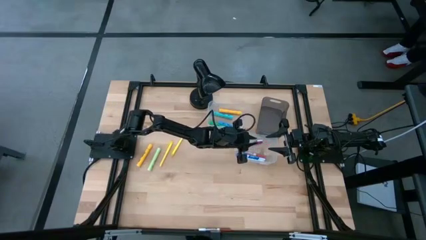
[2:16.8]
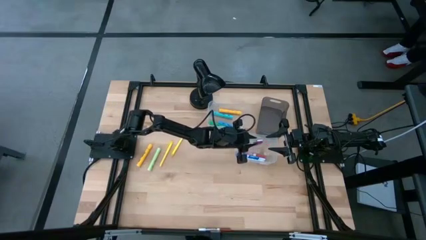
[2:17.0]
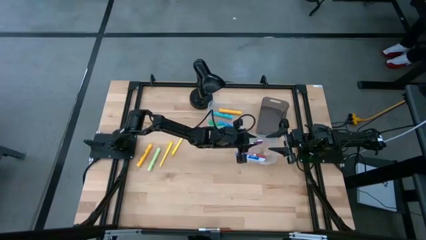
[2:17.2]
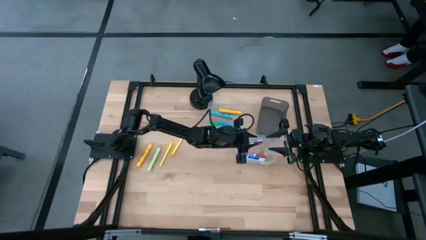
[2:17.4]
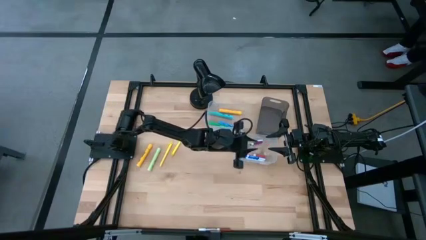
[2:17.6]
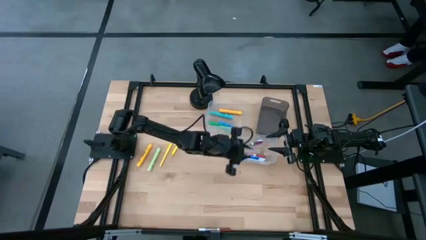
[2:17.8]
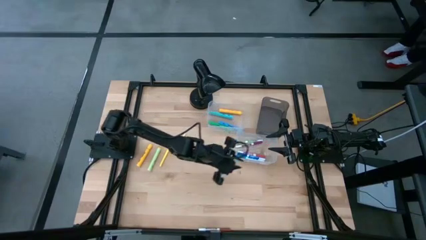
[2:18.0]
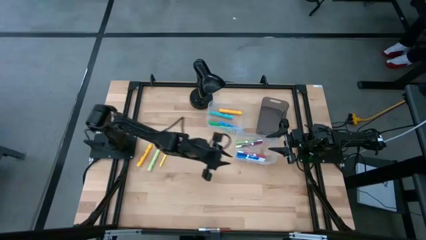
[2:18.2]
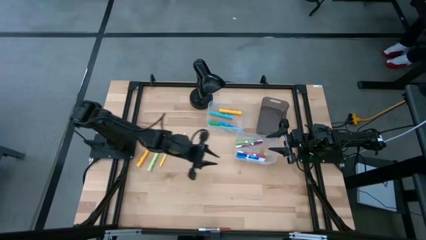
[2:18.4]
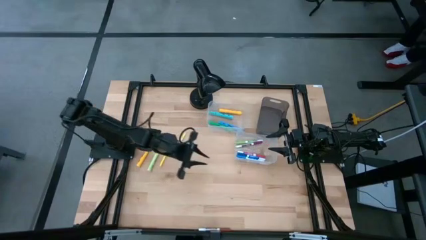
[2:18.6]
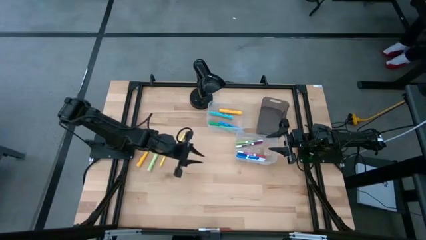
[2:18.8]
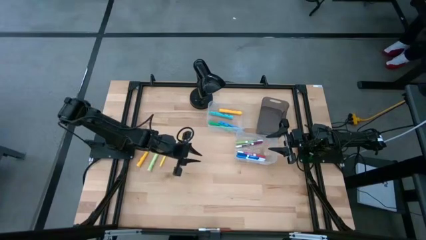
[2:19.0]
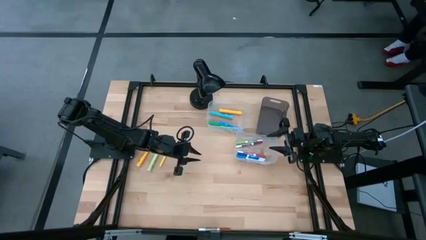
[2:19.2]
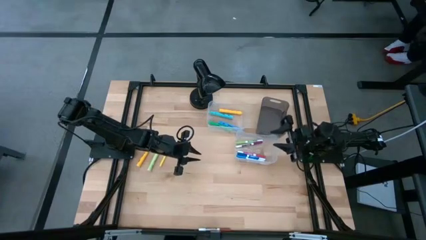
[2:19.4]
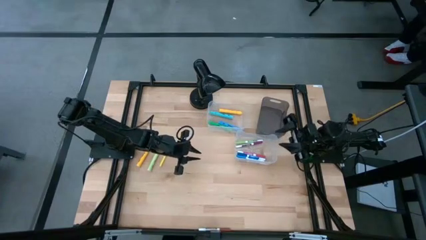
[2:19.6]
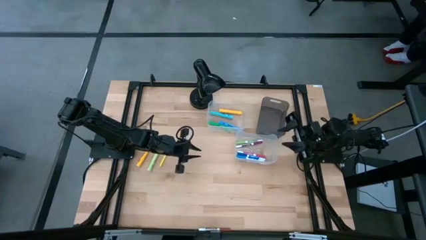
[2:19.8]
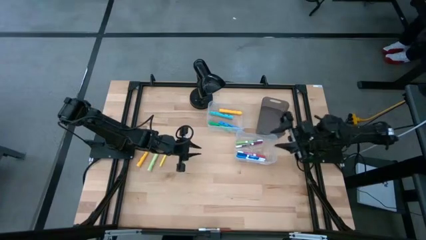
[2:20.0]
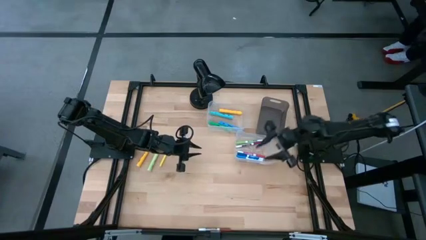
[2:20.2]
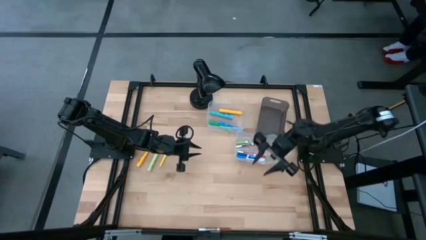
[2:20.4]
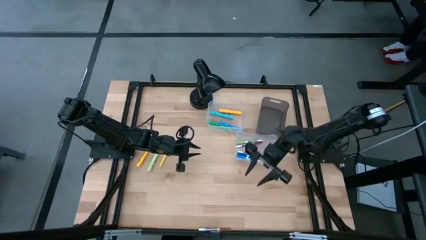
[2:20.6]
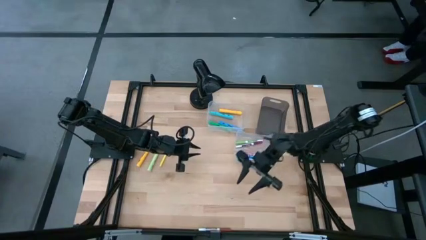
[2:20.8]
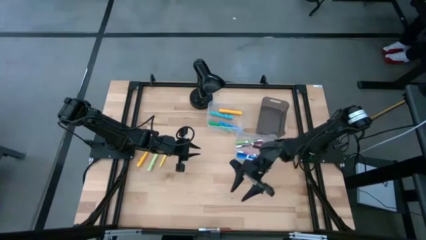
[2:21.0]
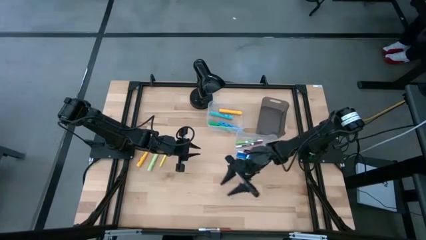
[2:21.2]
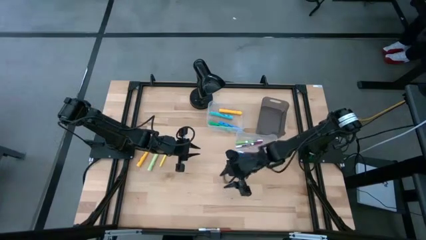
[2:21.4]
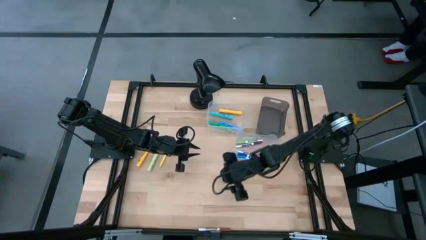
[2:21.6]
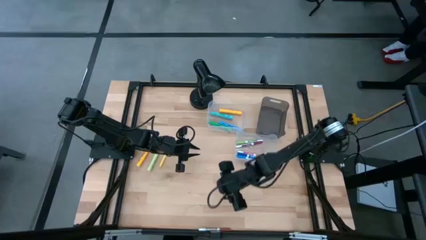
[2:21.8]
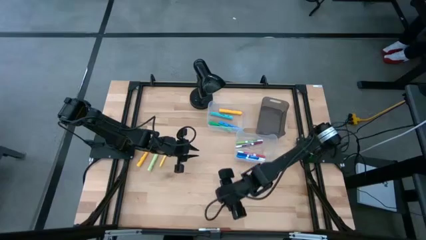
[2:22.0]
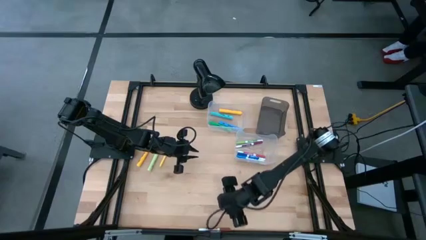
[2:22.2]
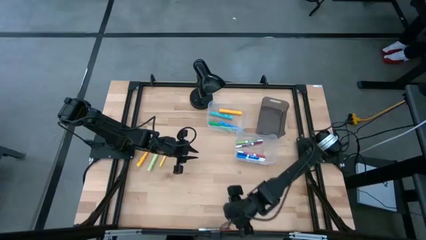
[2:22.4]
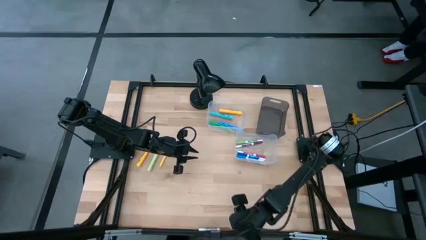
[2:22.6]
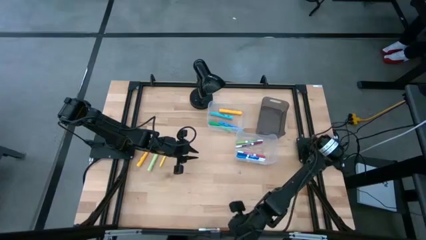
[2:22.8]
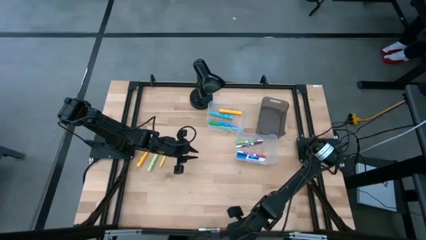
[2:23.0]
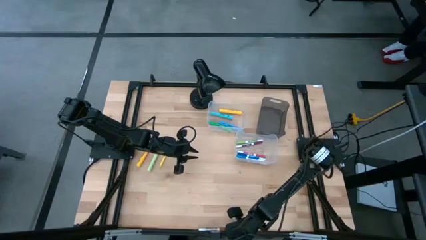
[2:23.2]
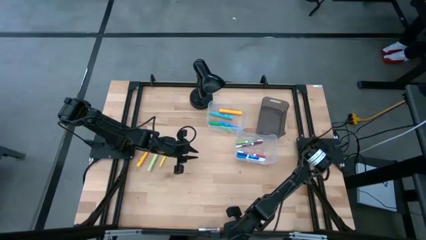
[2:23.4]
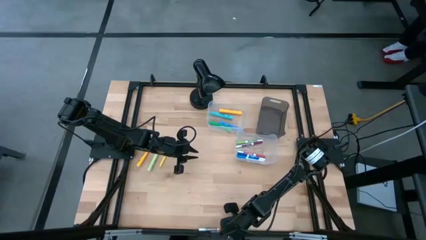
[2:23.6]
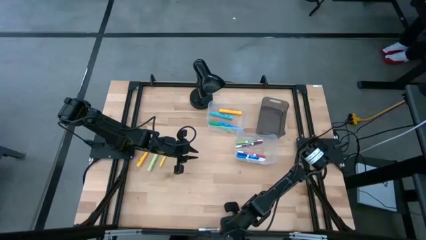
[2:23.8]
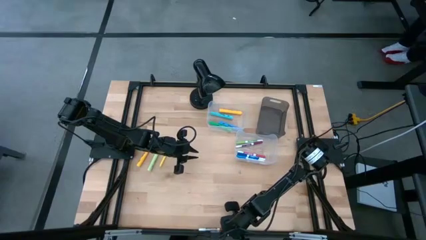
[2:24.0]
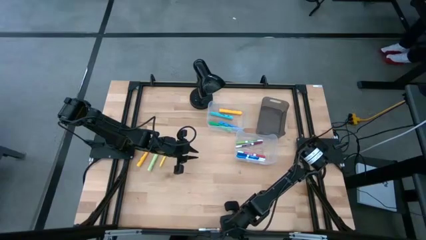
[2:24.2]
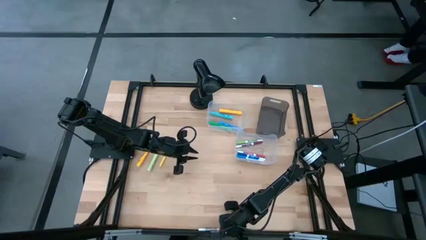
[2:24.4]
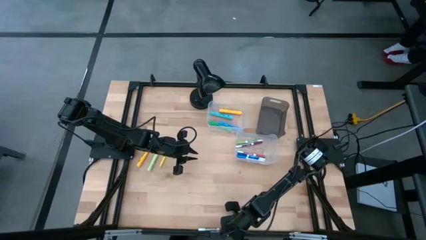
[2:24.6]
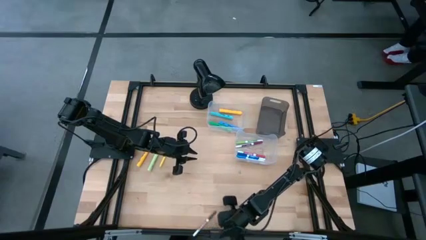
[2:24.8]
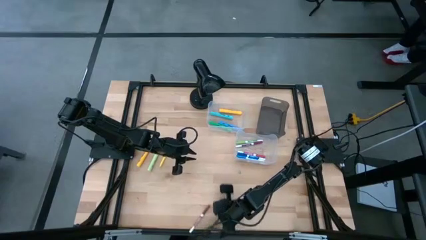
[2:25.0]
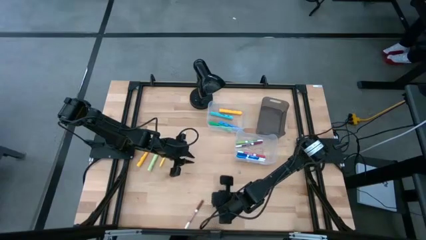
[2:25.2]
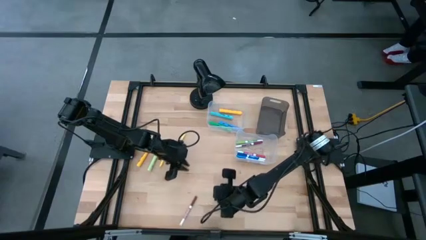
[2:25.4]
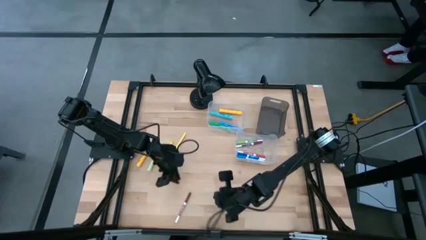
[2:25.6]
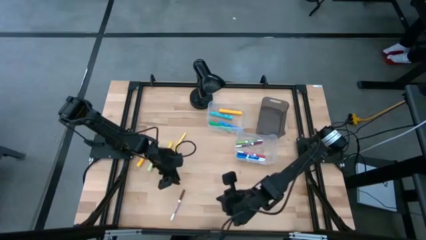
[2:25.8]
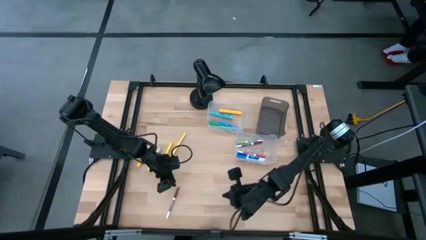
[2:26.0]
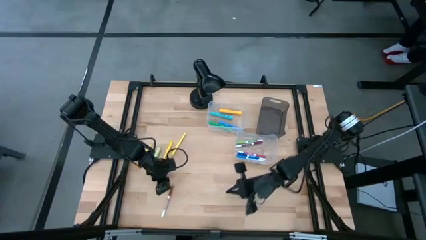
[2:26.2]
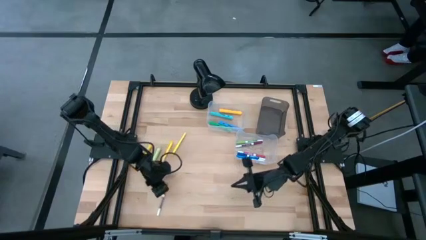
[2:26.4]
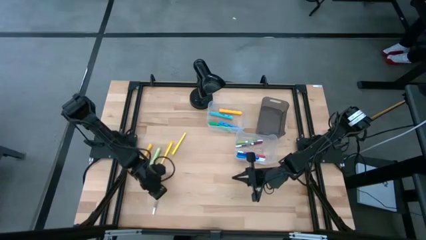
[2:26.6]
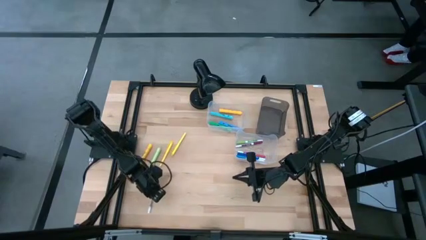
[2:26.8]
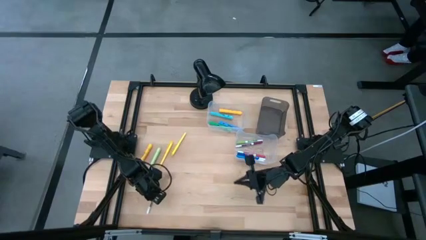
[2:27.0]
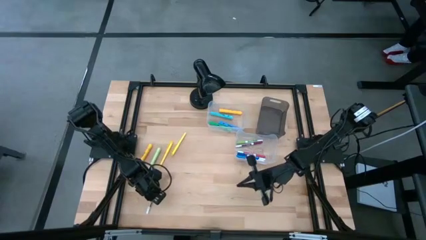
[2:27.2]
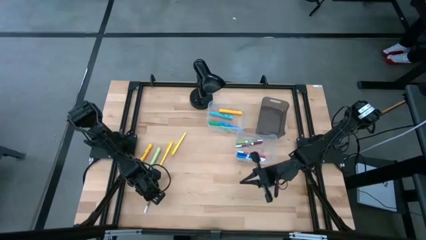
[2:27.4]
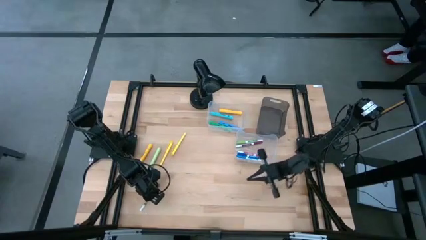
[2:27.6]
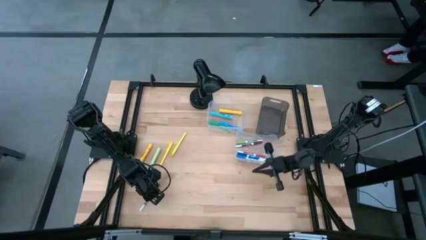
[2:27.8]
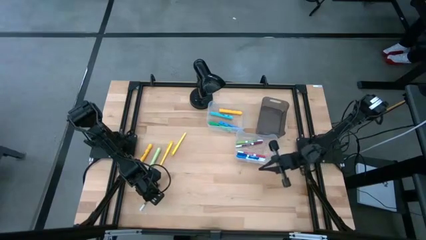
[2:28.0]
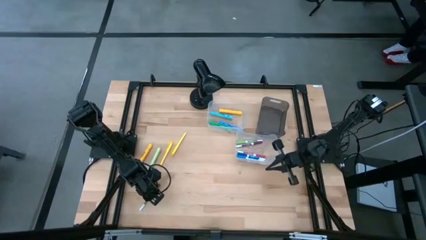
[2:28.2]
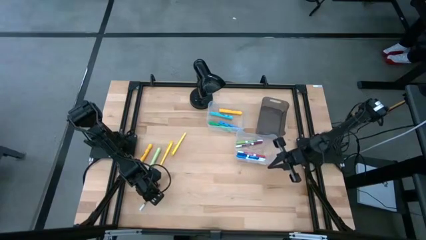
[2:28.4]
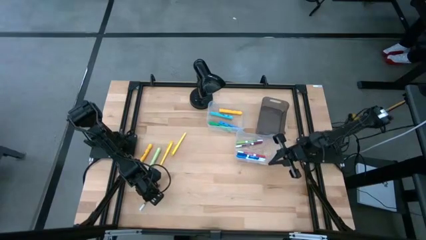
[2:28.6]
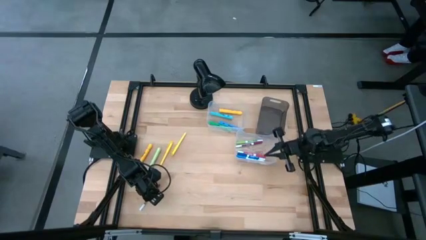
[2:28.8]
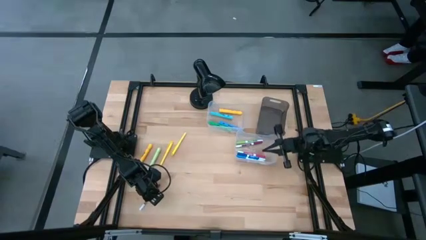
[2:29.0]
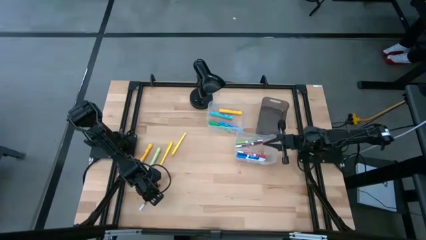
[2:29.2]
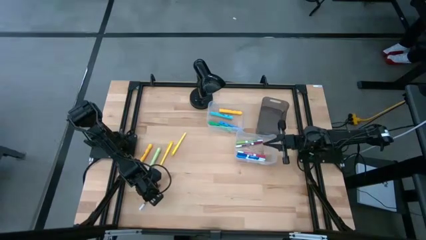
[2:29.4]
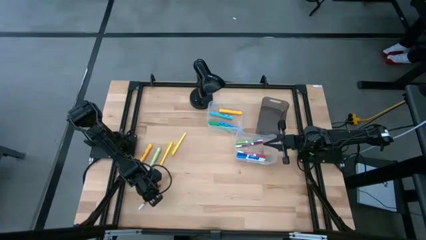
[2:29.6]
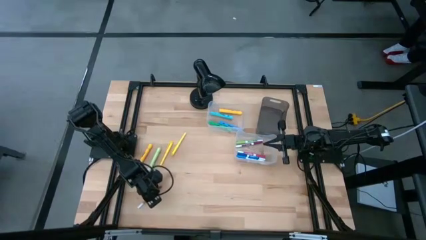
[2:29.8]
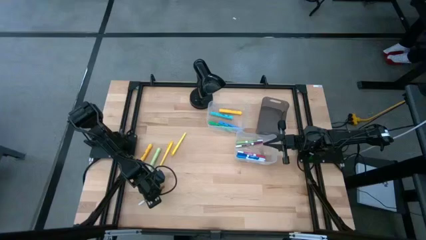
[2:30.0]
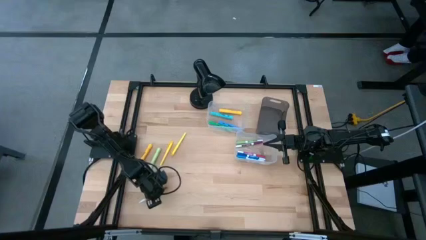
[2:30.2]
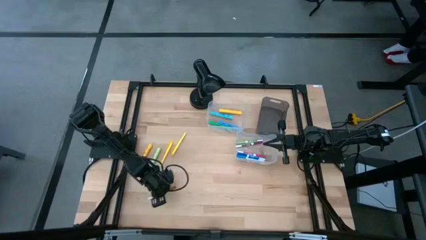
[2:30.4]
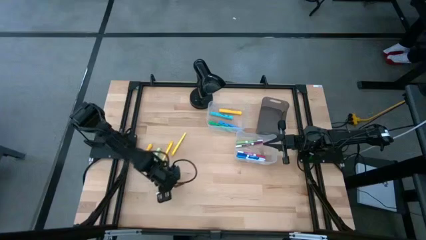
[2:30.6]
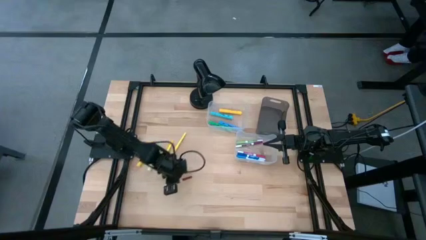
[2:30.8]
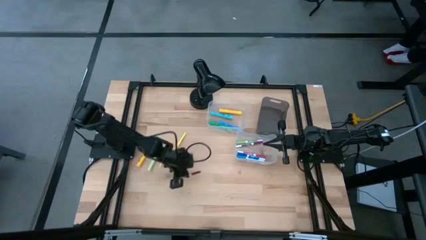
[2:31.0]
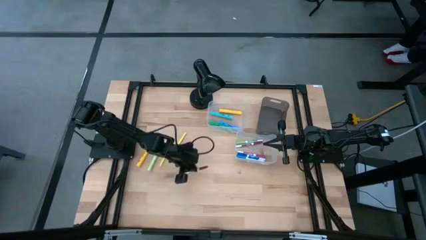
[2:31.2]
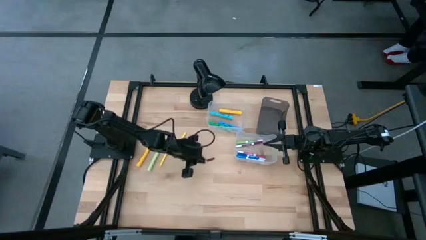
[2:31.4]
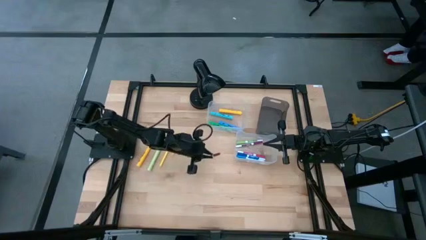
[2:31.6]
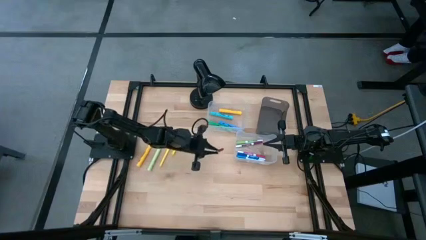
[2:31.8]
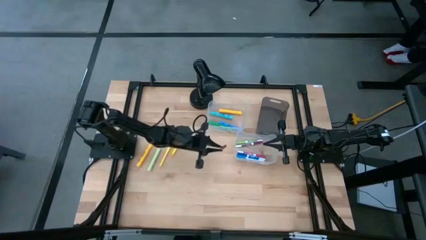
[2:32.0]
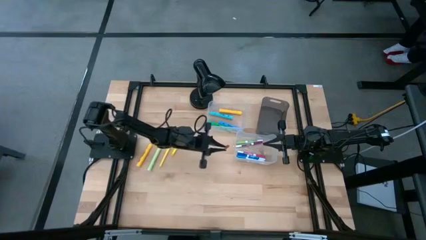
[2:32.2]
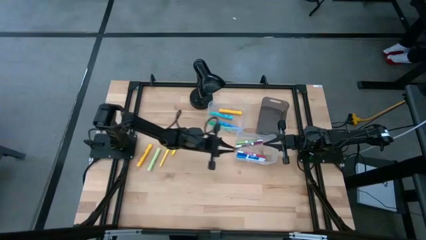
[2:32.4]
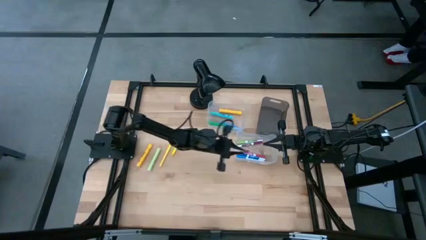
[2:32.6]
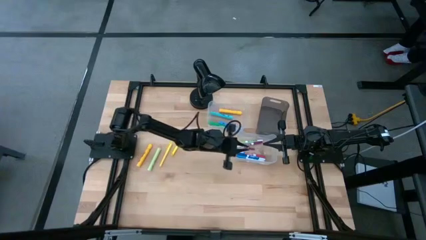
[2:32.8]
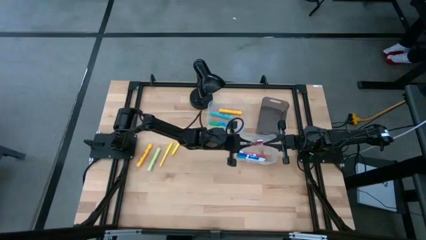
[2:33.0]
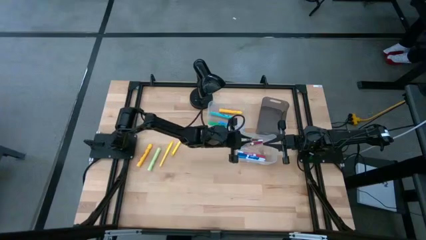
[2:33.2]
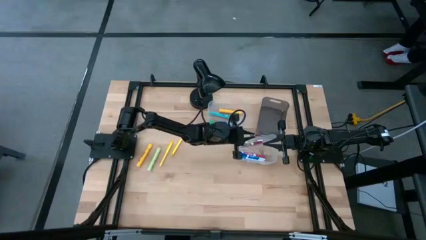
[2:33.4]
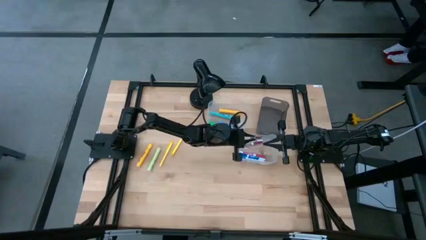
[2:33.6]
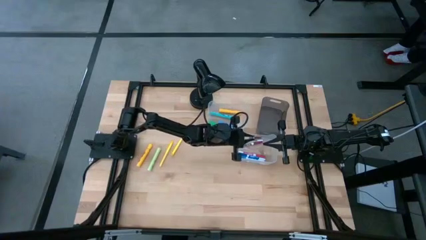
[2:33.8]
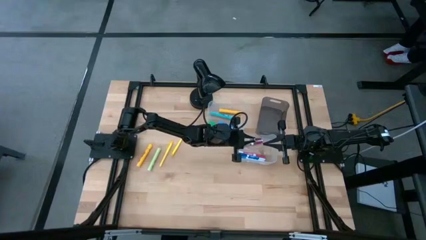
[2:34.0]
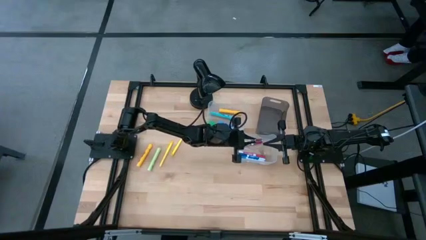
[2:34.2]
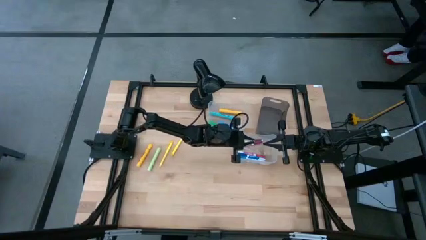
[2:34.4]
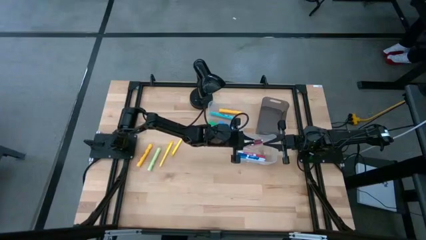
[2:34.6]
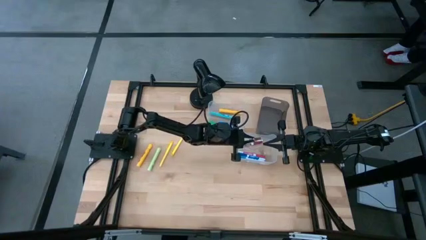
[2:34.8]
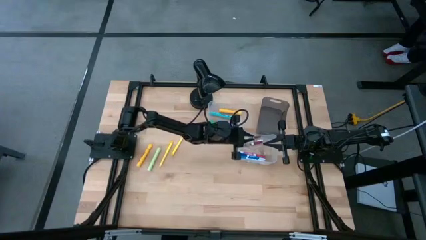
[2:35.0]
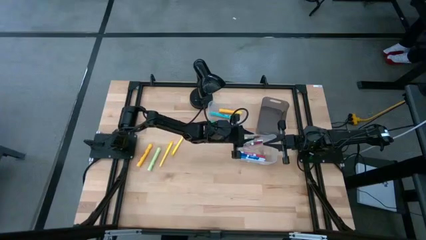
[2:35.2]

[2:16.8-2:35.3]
Task: Pick & Place Markers
Put the brown marker pen into the bottom transparent bin
